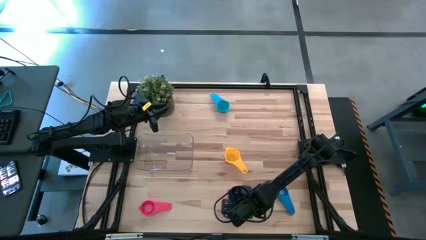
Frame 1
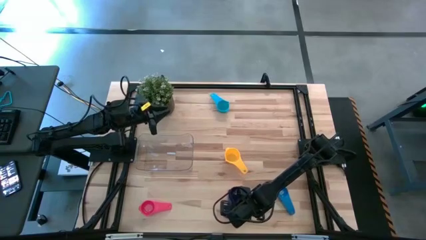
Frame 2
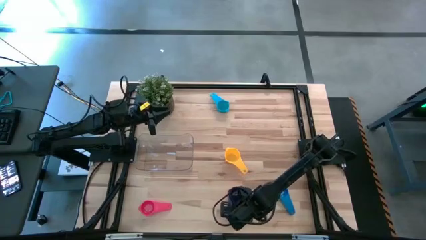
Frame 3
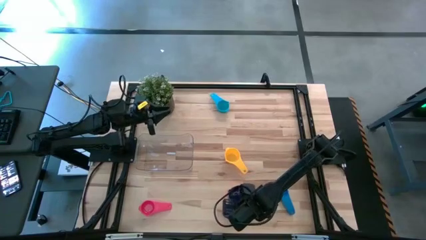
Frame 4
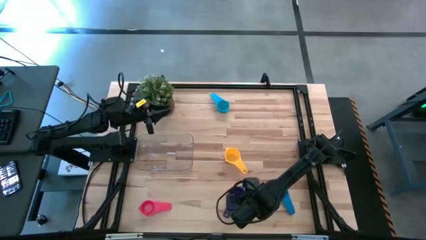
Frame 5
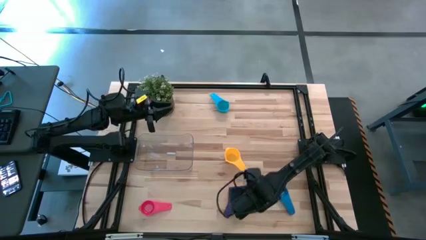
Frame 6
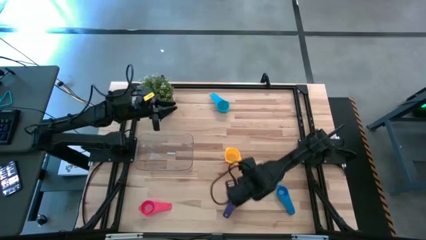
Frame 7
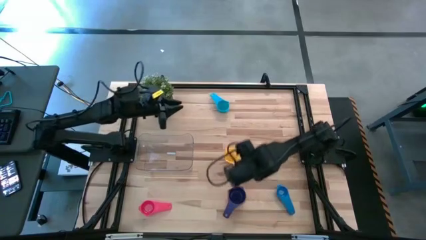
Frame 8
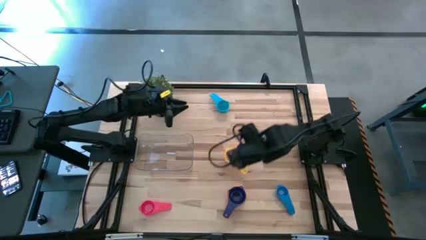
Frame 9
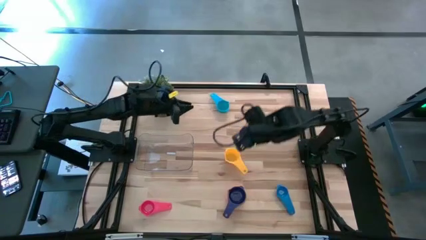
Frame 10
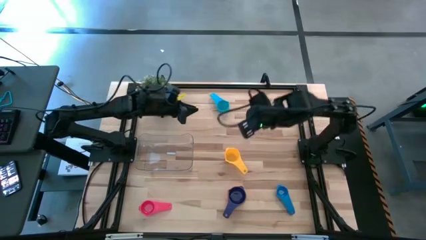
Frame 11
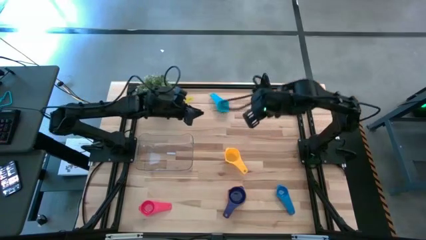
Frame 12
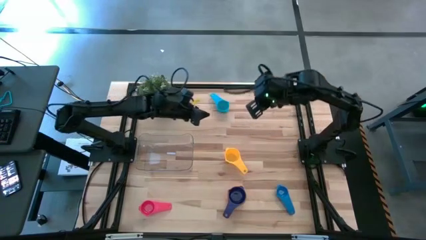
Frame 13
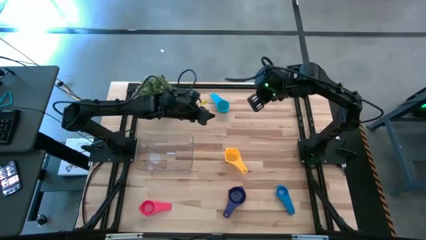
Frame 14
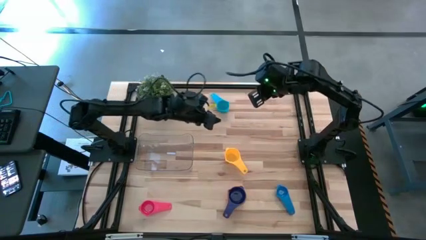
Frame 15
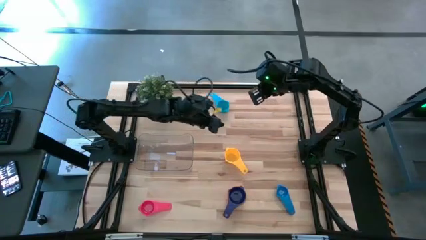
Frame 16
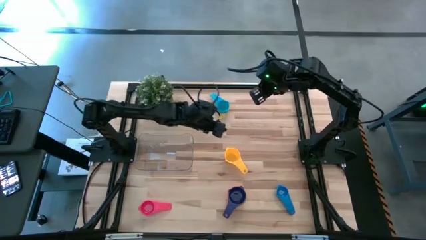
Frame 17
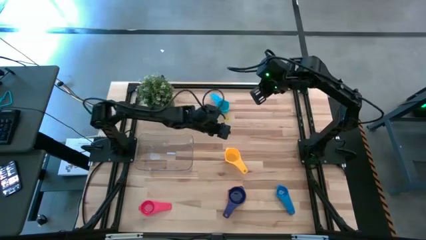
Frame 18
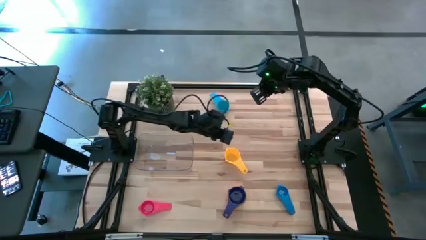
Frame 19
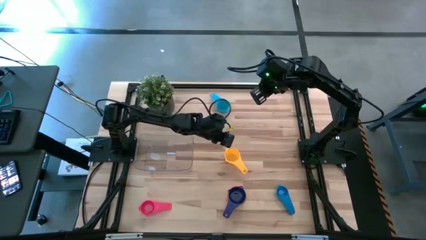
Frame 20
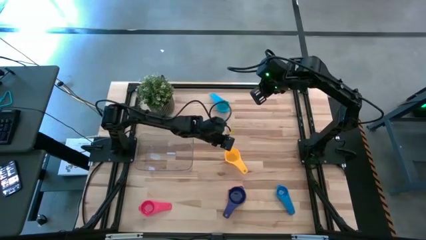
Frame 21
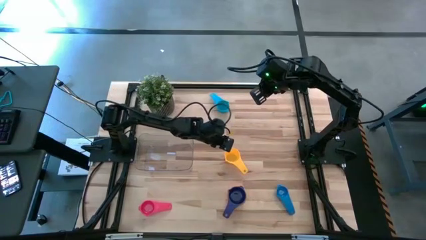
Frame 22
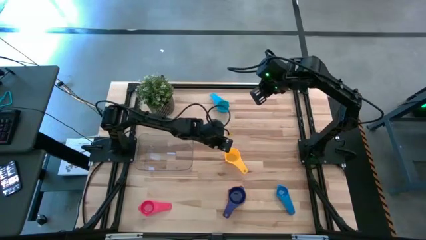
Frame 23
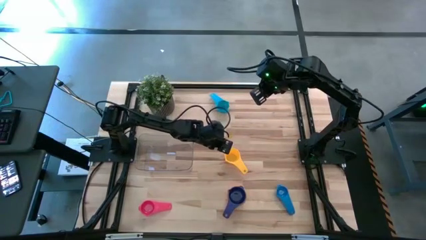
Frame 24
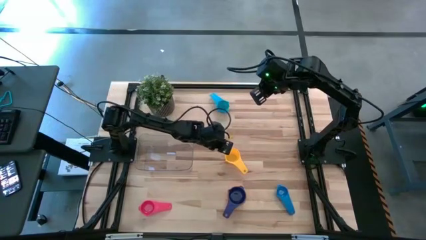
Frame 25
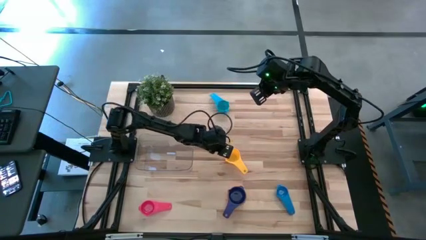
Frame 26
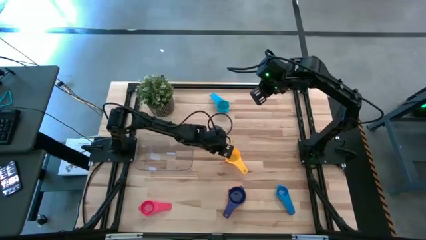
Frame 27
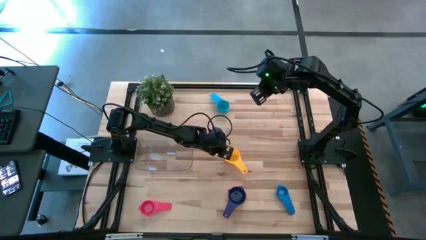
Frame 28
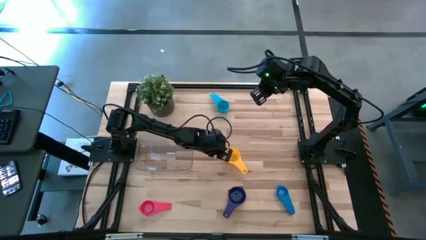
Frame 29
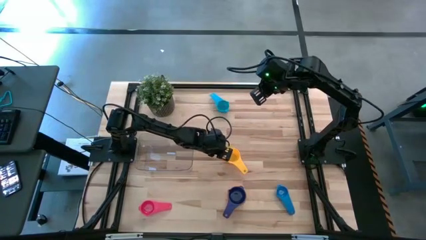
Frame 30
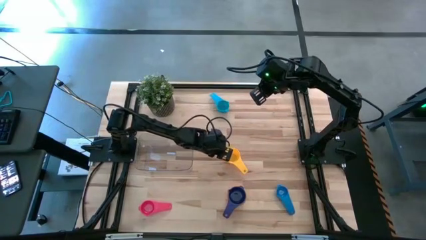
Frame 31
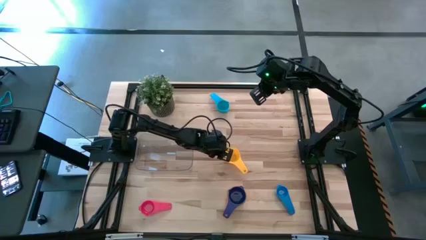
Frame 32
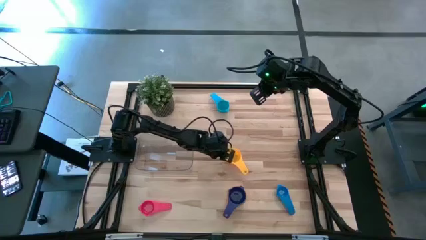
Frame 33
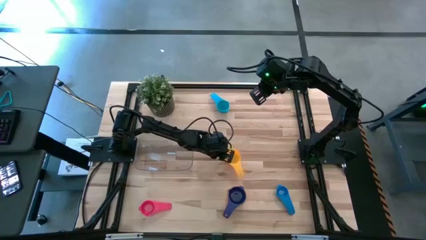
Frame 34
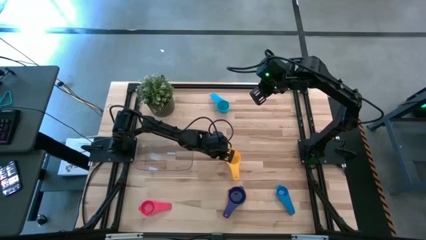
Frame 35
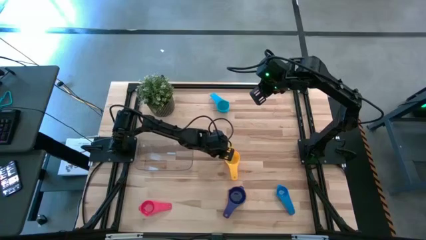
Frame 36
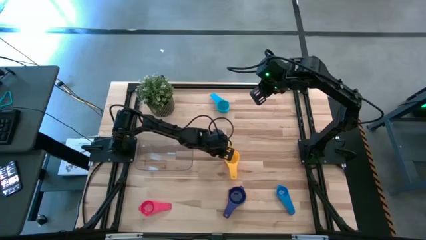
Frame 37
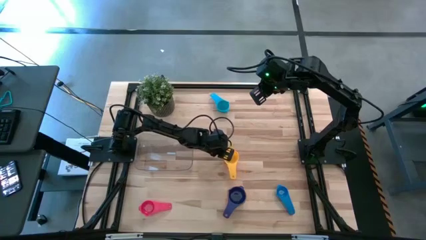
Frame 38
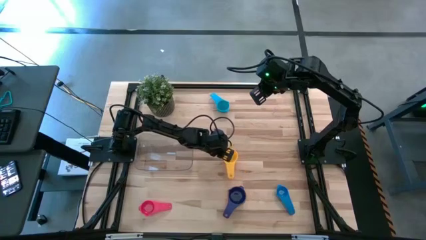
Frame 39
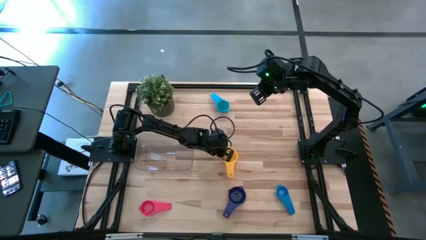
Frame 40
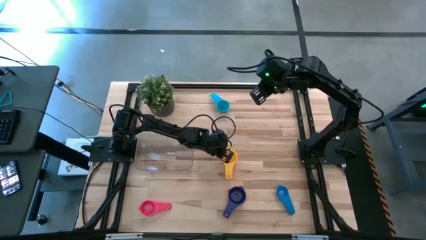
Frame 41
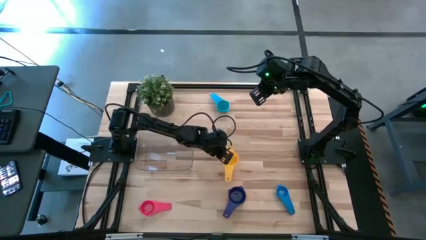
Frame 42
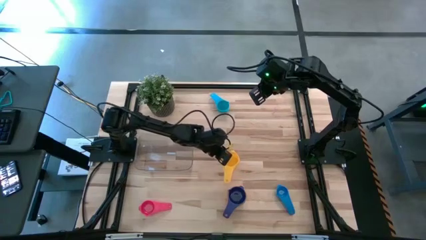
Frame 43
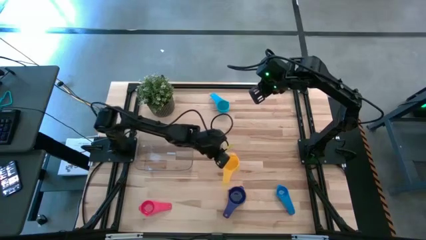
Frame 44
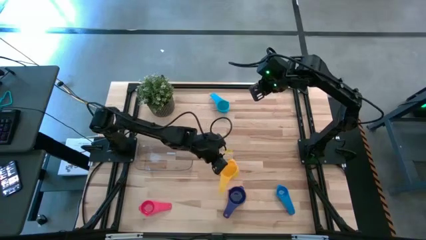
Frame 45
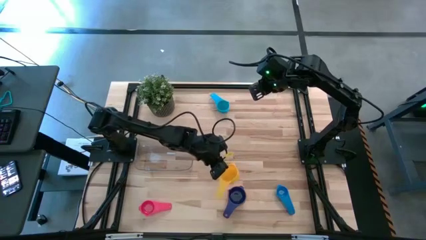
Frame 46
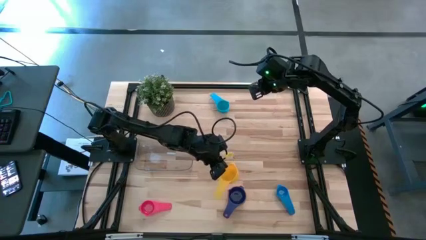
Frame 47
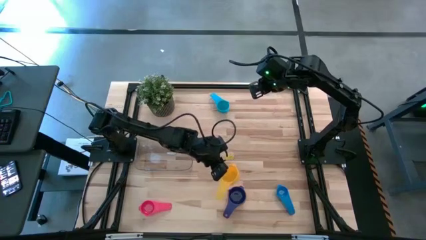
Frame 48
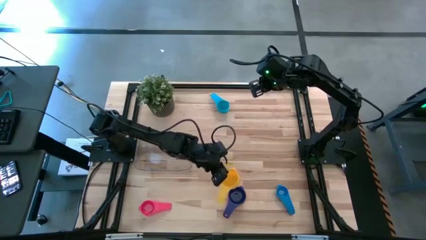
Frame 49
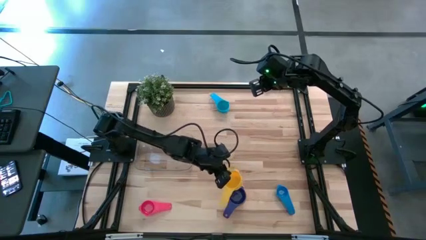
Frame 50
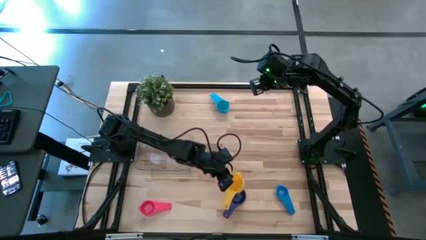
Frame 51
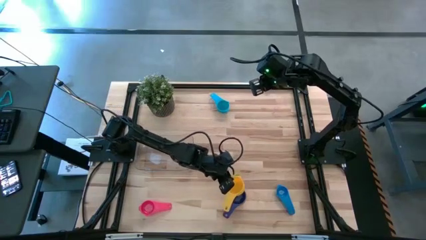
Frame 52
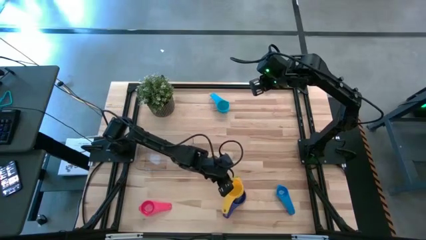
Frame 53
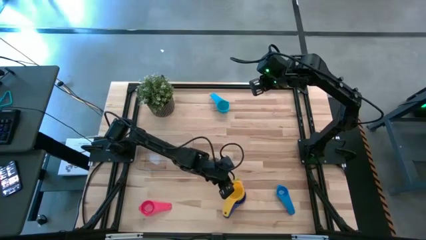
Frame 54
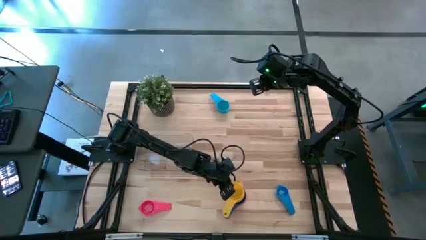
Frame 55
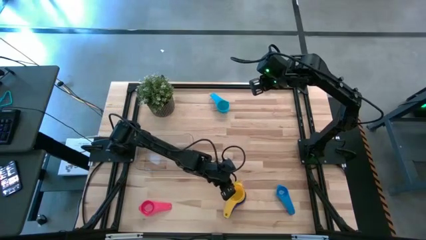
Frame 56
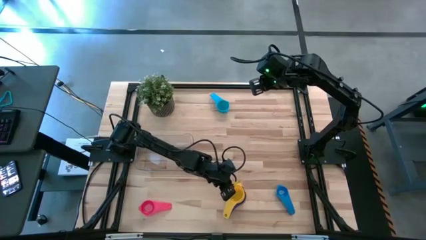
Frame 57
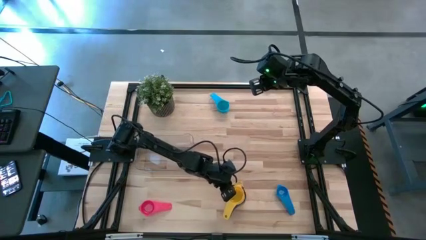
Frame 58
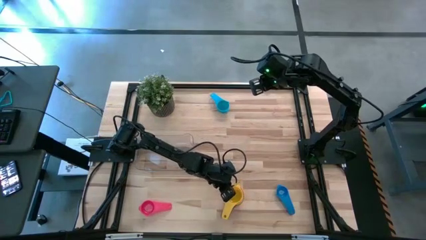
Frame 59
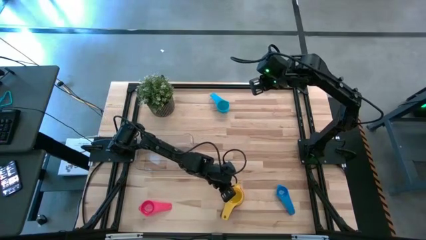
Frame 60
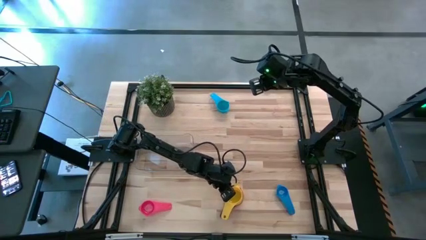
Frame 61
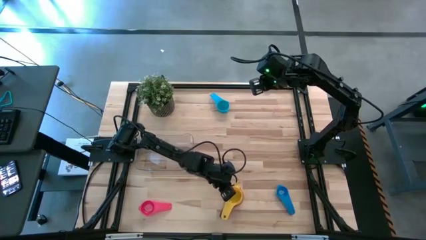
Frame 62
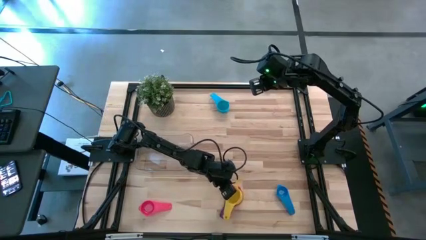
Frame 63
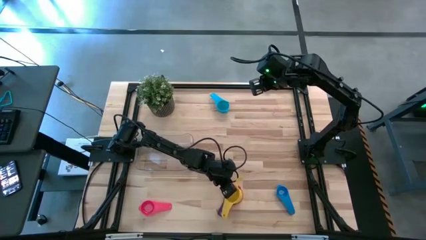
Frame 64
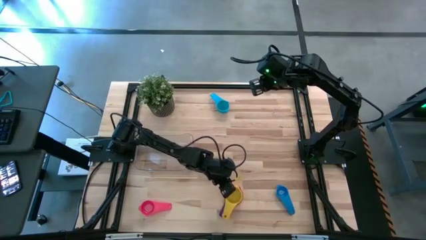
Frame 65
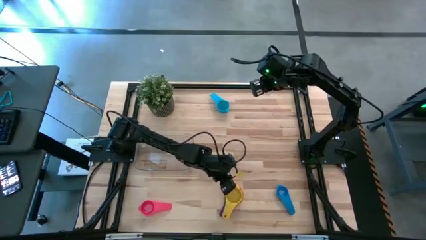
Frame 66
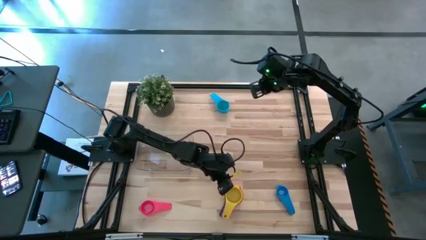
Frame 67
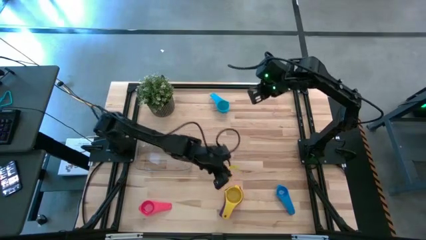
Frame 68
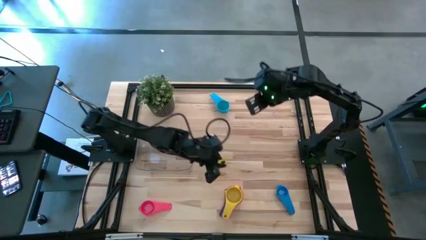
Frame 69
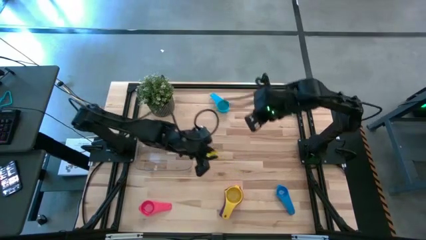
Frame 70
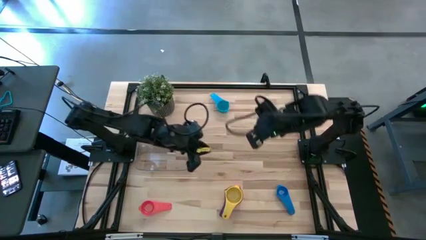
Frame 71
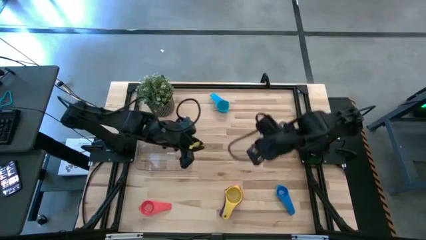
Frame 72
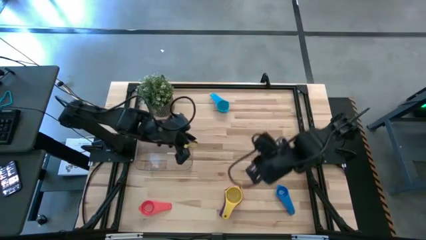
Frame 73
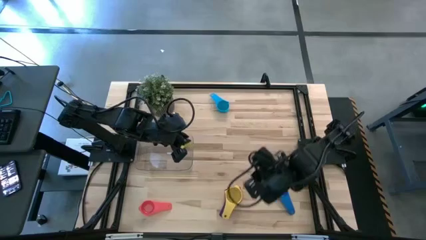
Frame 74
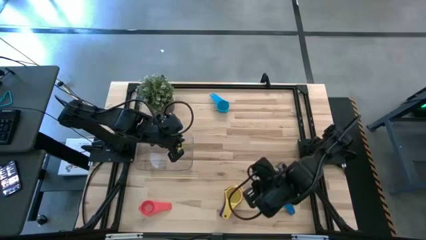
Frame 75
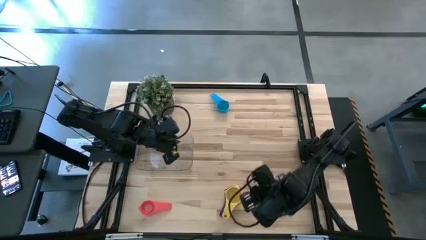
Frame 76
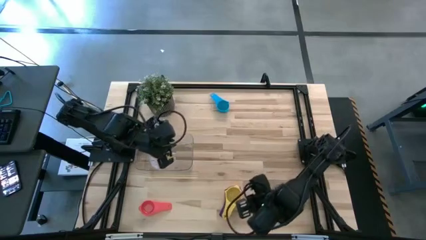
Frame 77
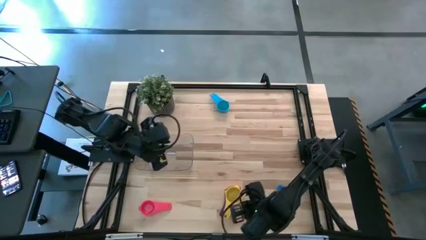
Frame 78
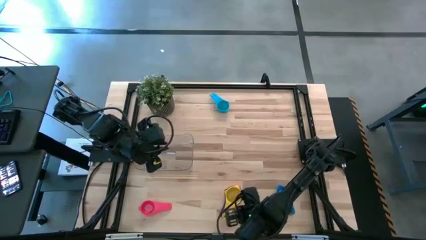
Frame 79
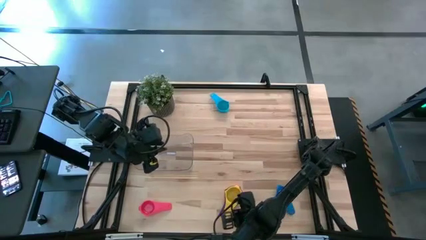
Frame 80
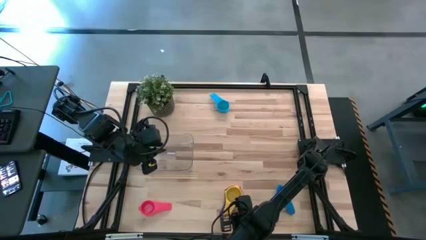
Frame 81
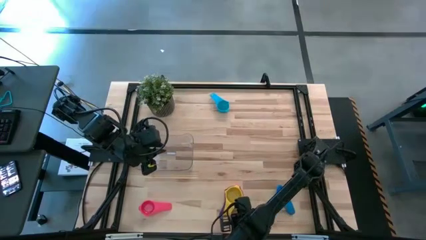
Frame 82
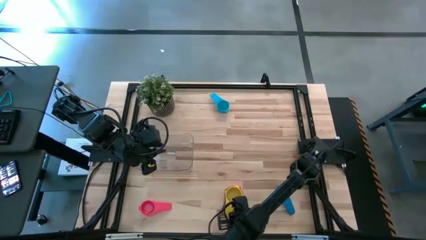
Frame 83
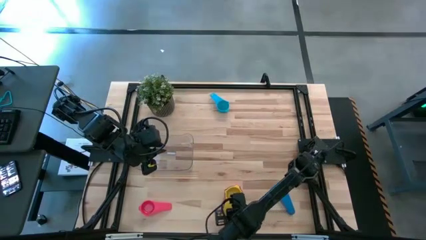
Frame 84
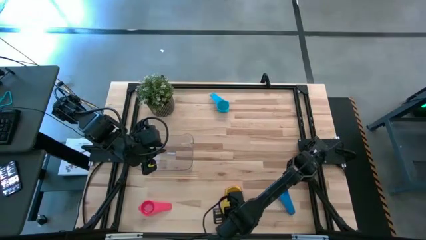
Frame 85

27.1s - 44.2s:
Task: Nest measuring cups in basket
Stack the yellow measuring cup on top of the purple measuring cup
